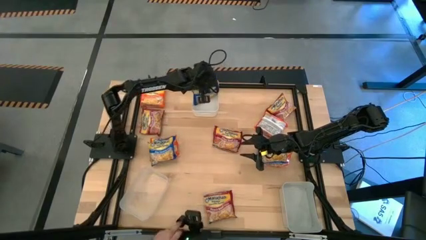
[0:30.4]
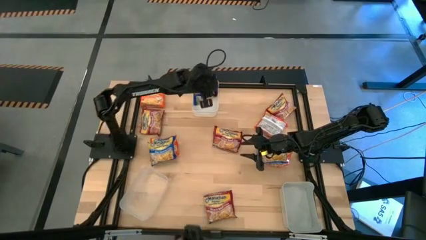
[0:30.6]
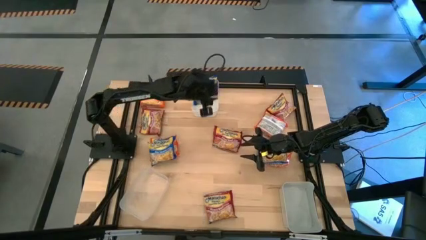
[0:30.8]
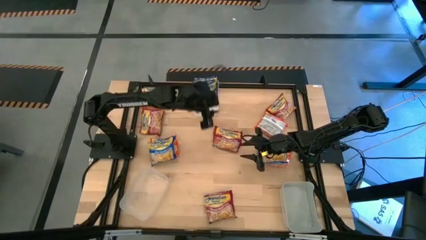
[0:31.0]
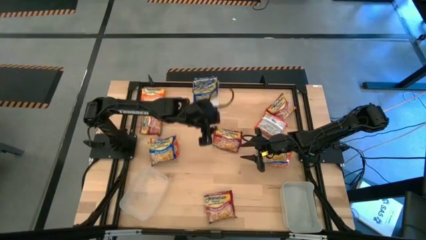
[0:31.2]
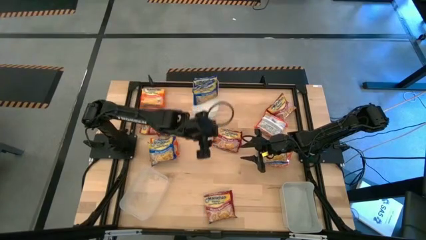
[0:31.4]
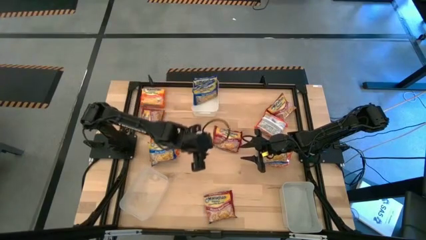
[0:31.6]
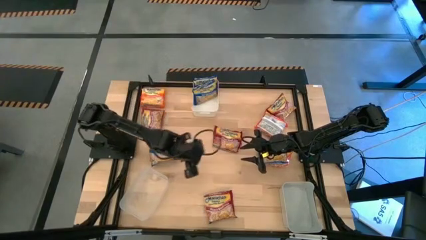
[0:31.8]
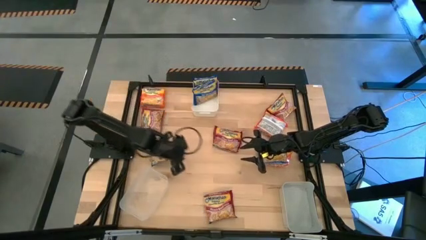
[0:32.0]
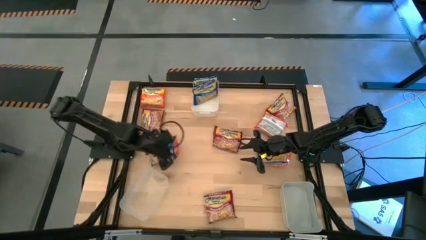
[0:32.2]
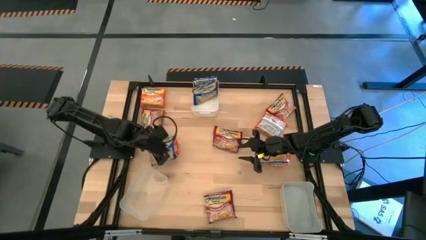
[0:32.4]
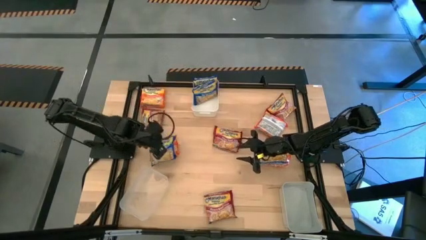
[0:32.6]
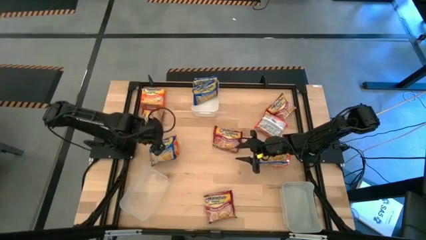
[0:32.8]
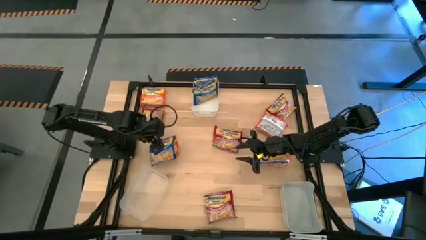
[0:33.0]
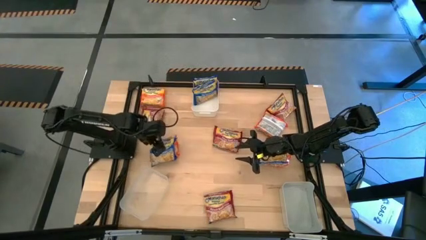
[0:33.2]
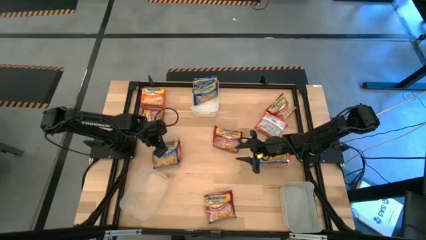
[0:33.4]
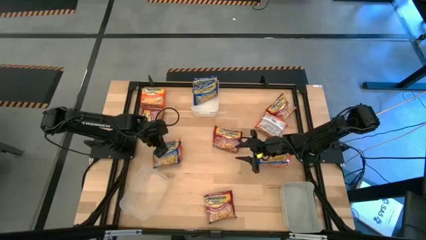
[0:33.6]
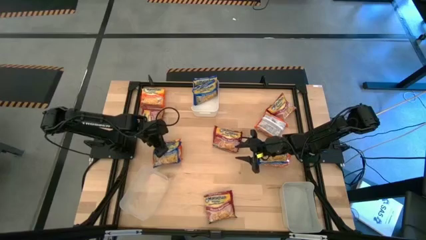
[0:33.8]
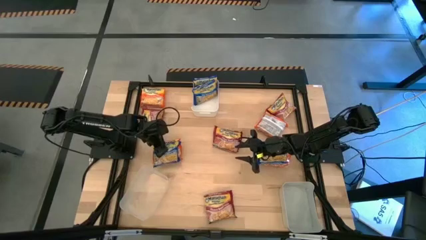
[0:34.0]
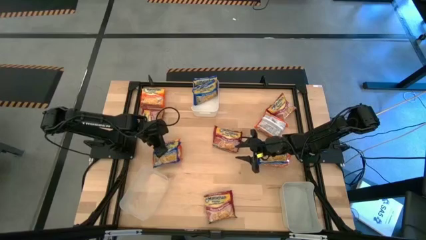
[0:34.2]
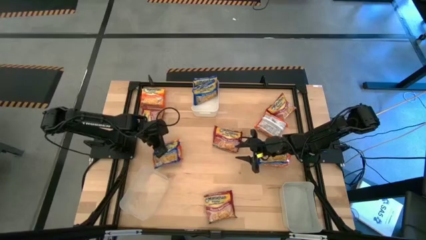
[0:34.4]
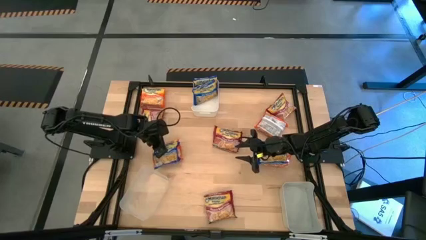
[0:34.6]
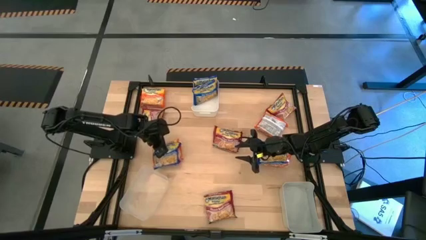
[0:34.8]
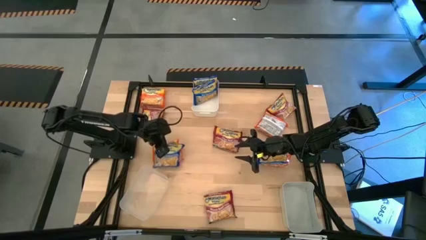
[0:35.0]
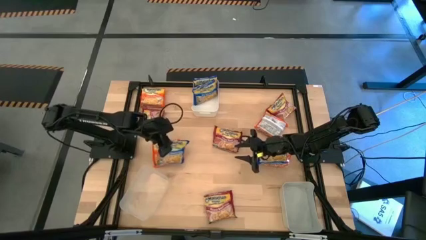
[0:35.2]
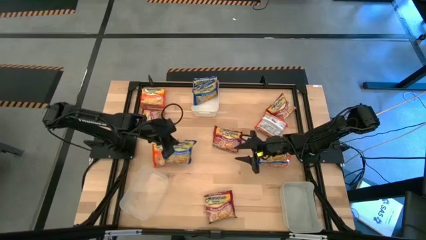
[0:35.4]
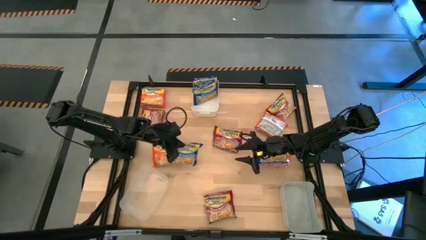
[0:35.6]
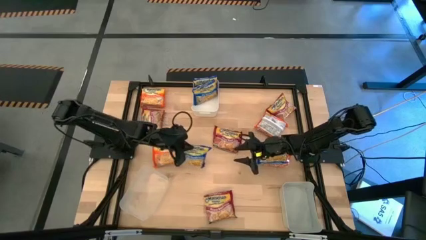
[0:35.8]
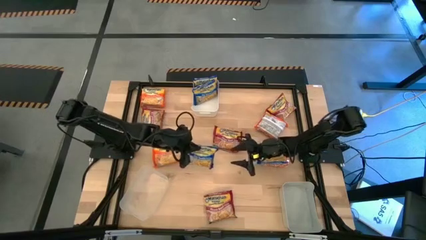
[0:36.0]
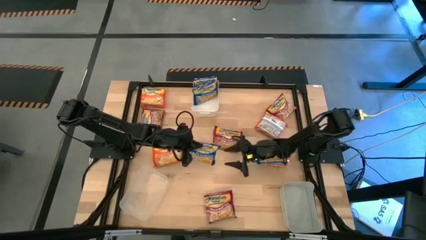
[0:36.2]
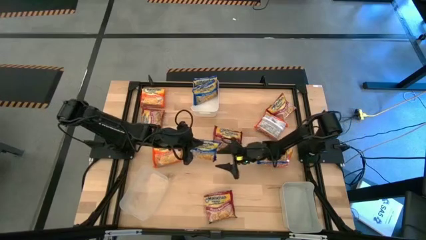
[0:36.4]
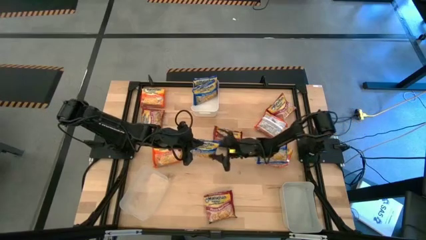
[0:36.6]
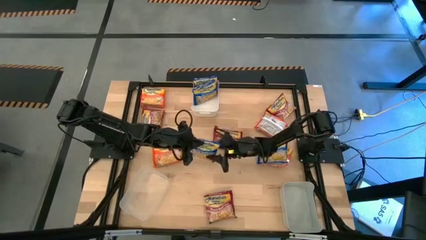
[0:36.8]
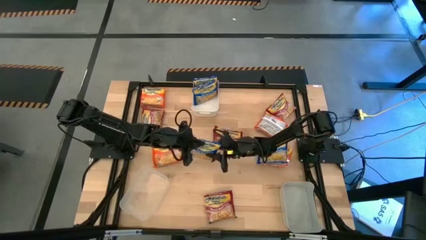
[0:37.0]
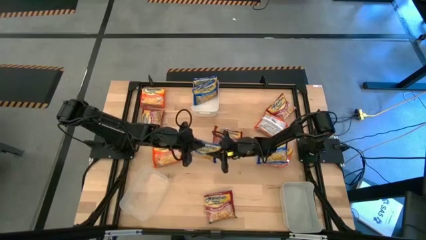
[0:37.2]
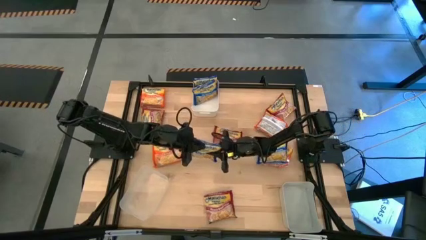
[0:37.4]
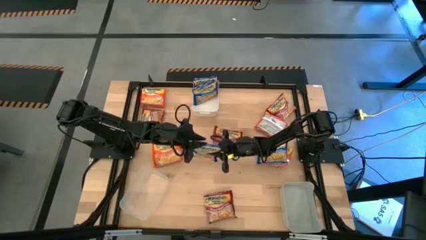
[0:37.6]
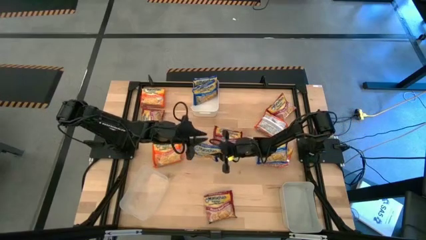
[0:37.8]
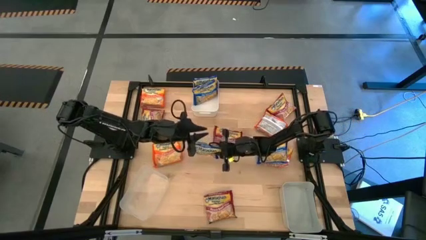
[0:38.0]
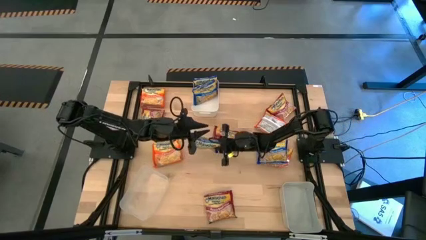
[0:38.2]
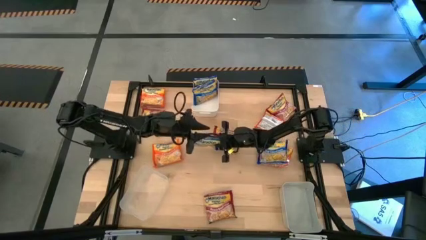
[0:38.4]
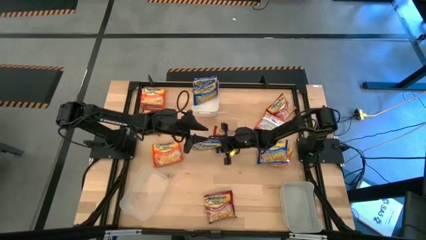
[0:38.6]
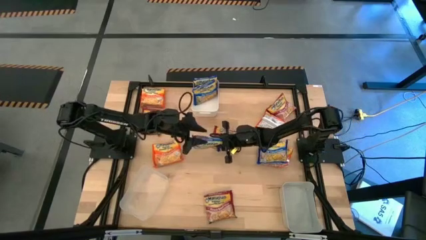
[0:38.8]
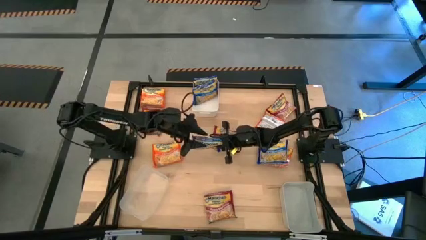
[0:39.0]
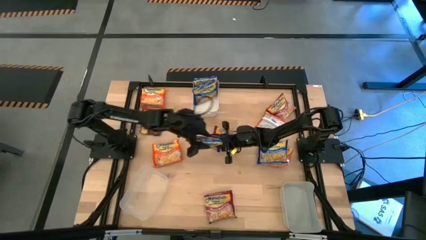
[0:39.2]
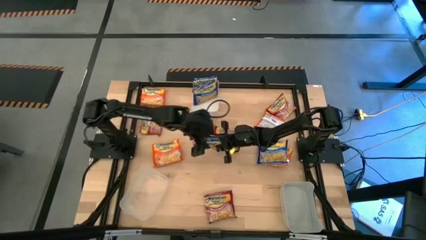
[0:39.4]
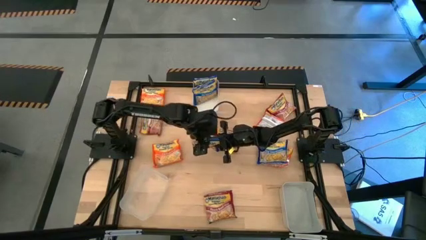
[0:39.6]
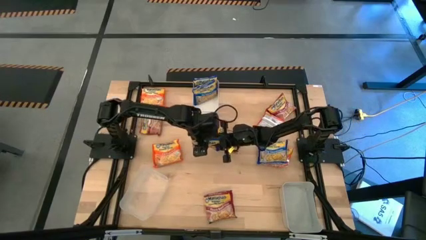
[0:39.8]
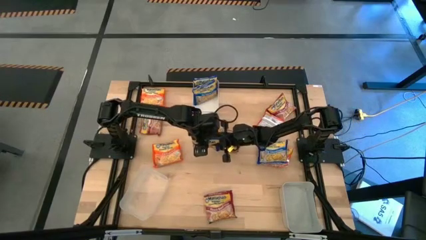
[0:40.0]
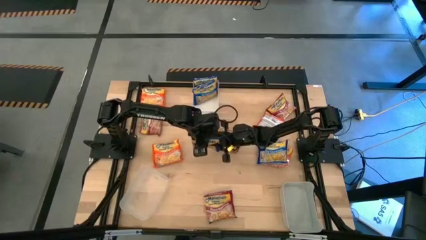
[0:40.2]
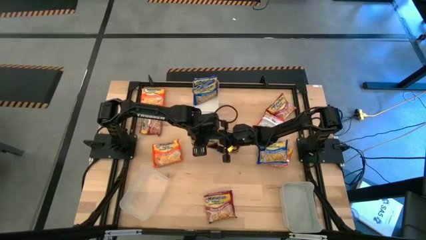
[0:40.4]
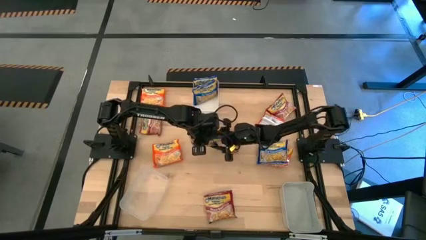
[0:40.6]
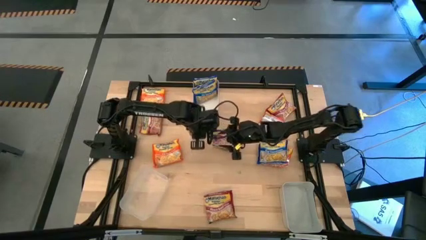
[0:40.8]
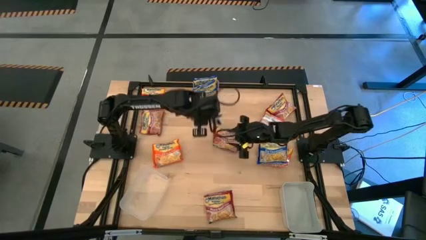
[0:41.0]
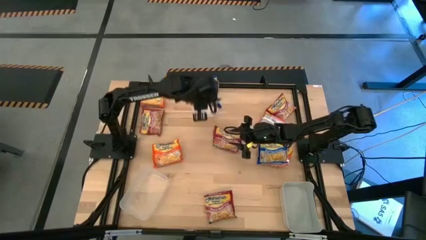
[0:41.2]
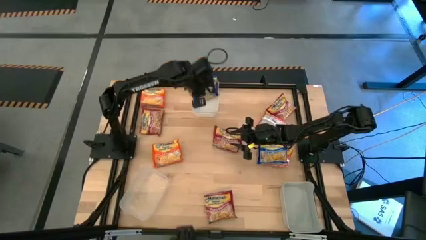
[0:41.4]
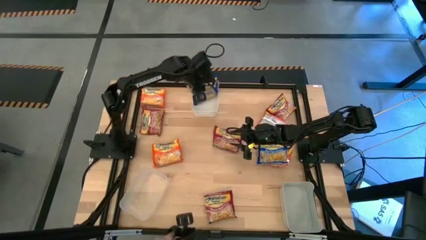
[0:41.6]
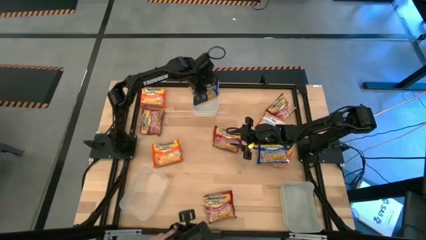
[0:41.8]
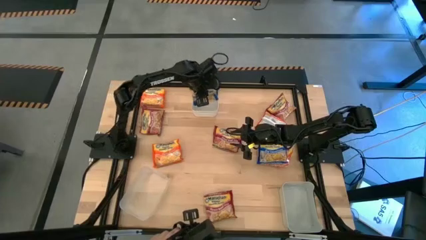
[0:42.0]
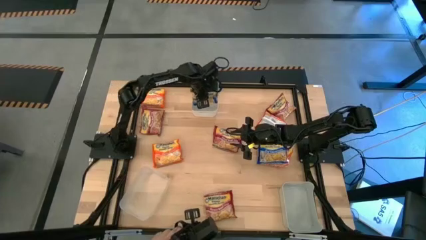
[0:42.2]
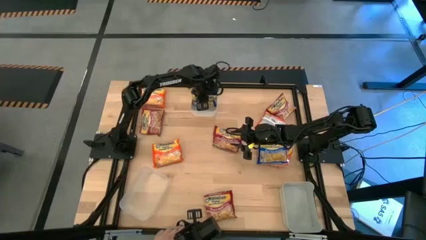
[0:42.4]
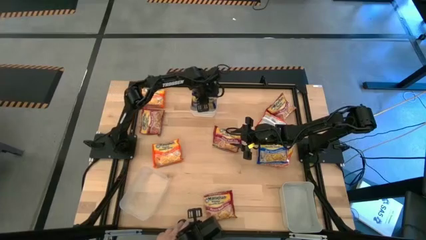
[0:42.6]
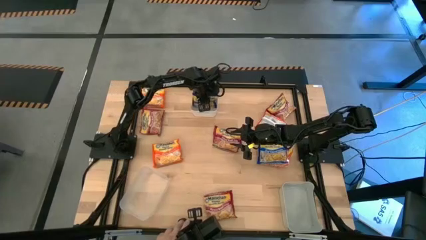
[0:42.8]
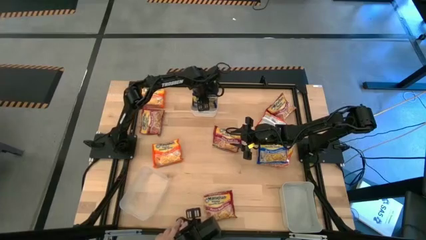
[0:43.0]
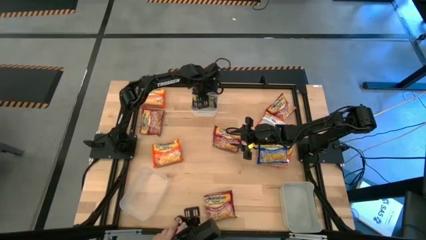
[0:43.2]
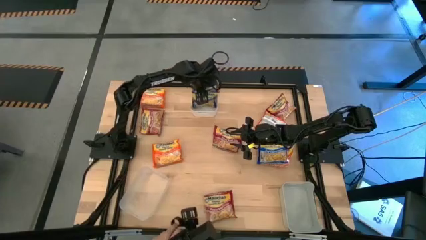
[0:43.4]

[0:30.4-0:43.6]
Task: Sort Maruchan noodles
Put the blue noodle pack into the white bin
